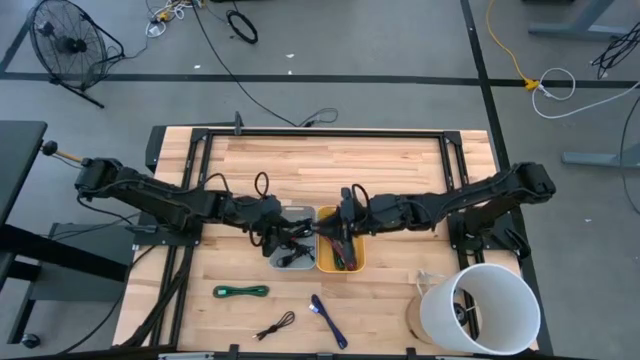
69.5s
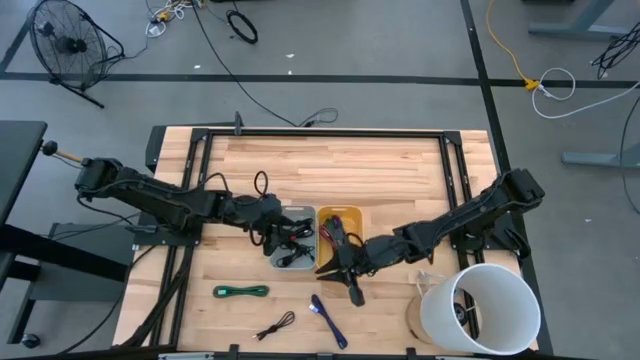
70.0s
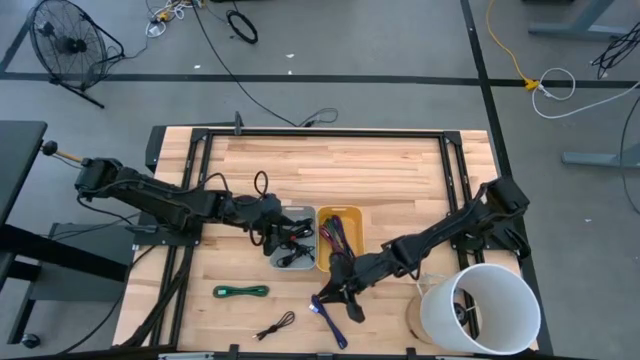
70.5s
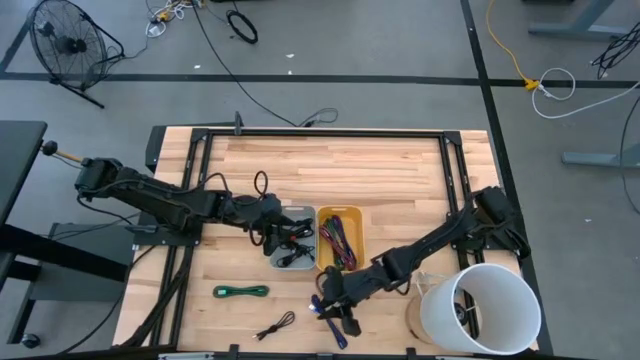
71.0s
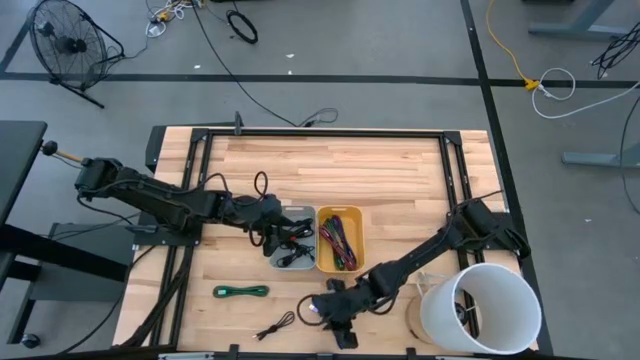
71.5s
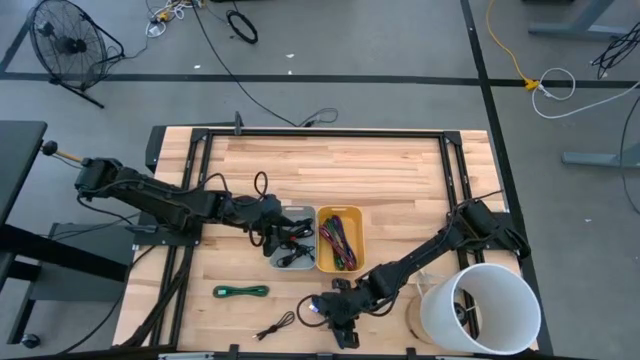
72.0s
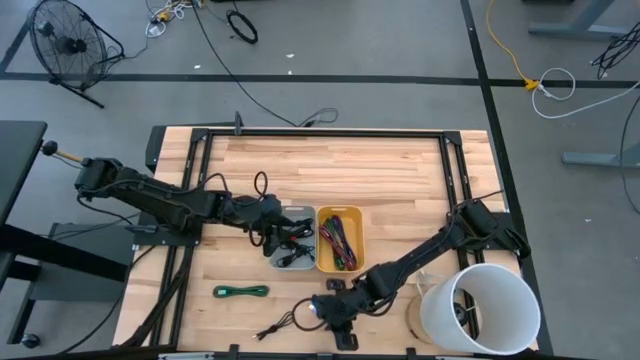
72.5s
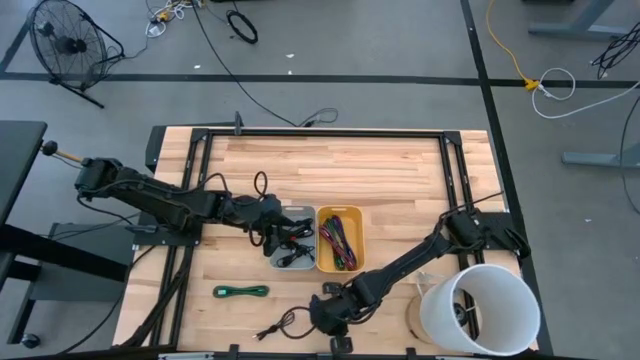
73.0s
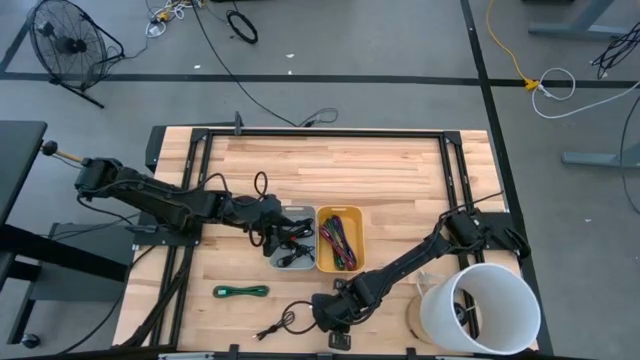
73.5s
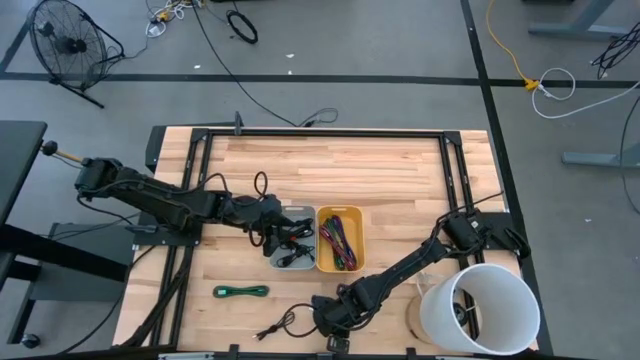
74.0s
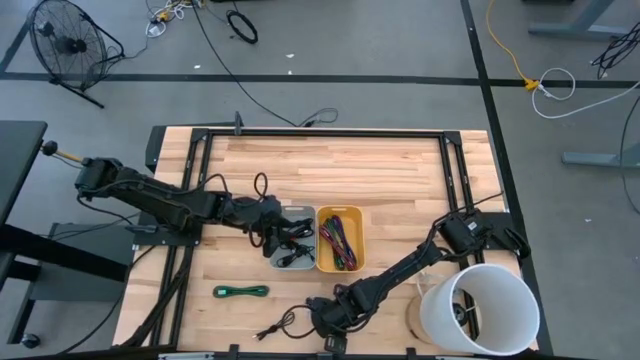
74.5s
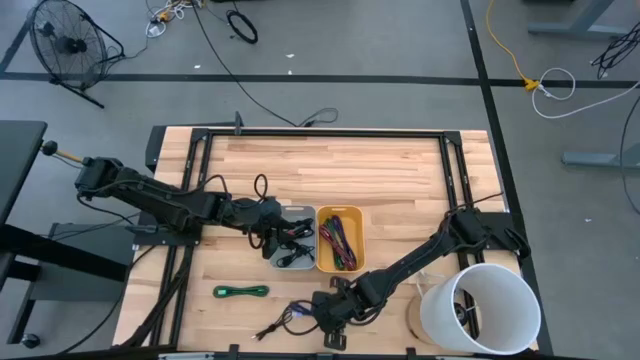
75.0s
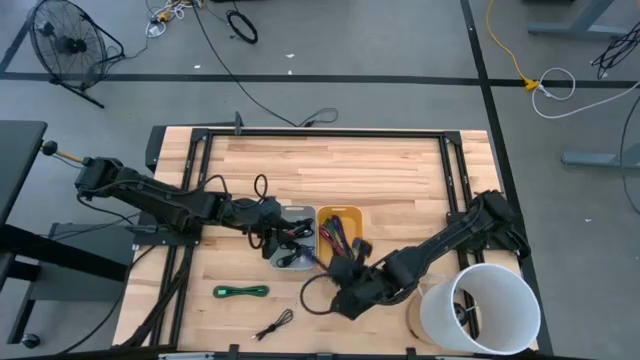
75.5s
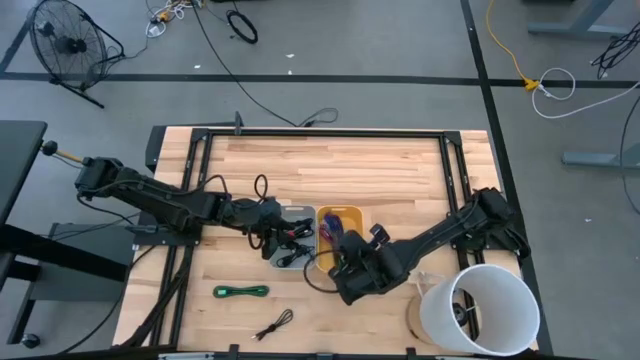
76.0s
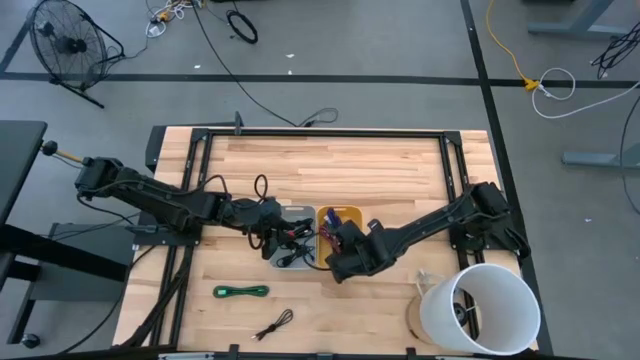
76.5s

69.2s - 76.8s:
Task: Pick & Place USB Port
Put the blue charger cable into the yellow bin

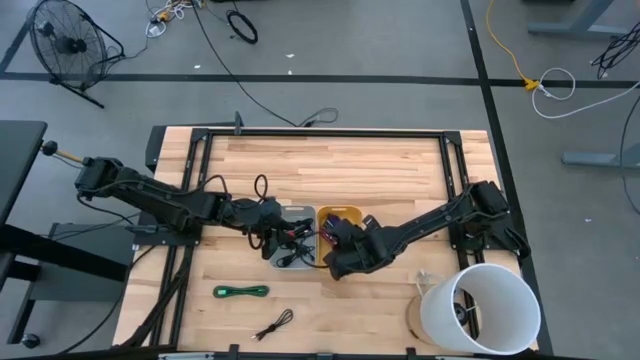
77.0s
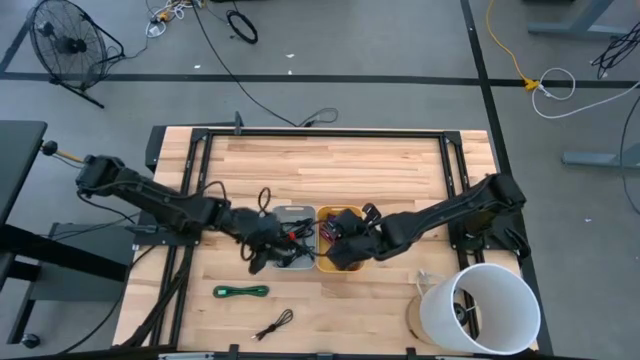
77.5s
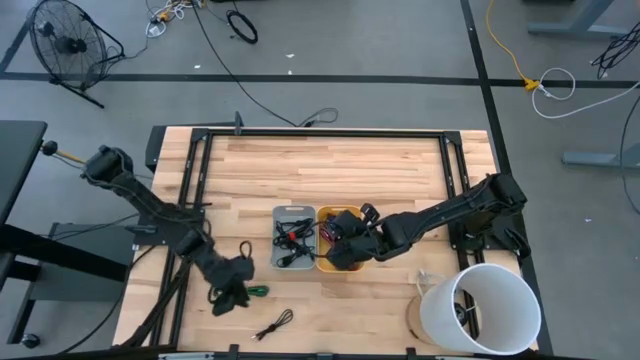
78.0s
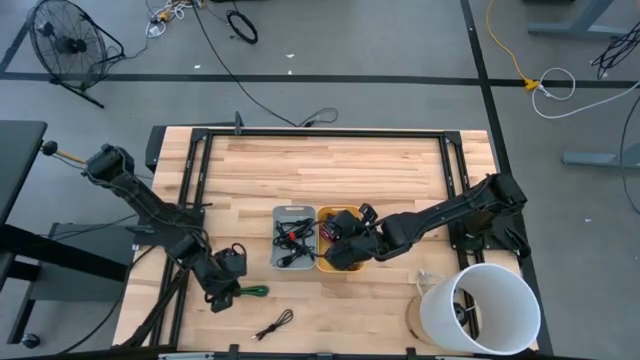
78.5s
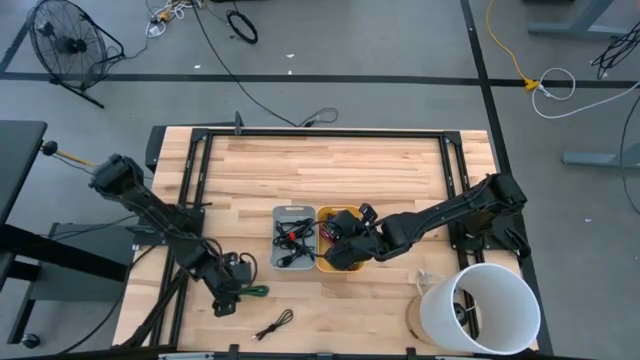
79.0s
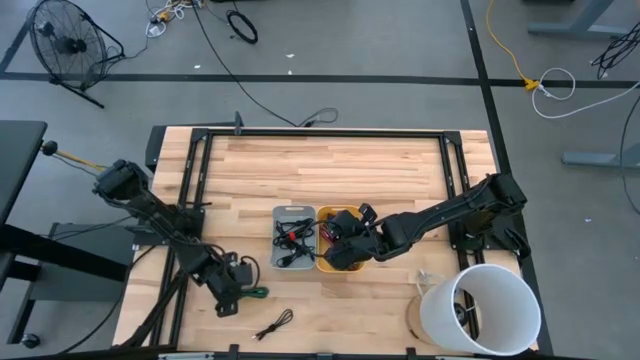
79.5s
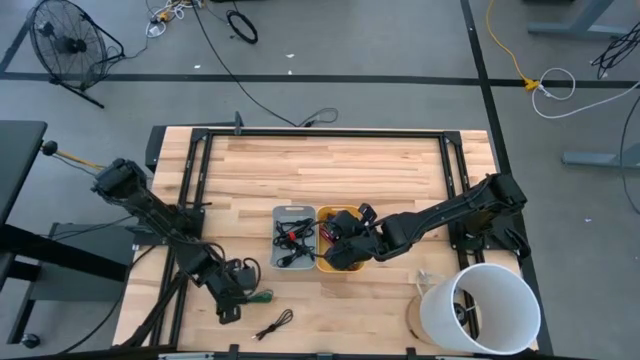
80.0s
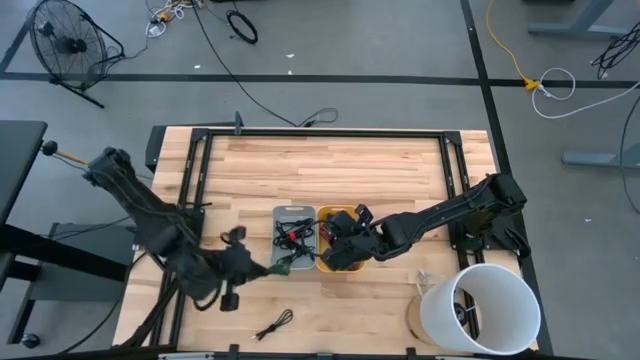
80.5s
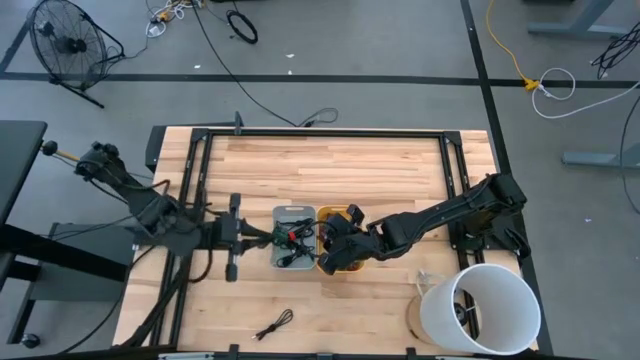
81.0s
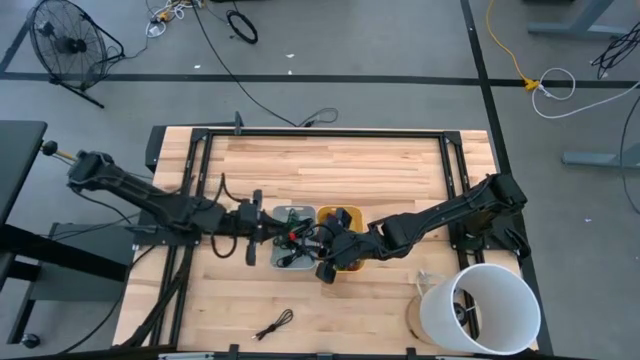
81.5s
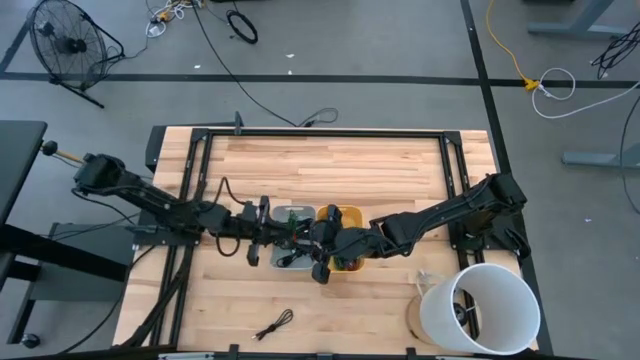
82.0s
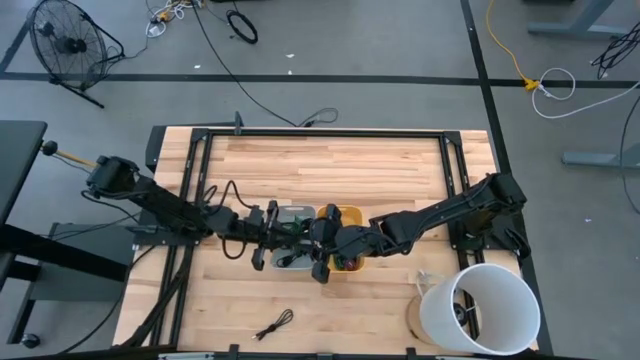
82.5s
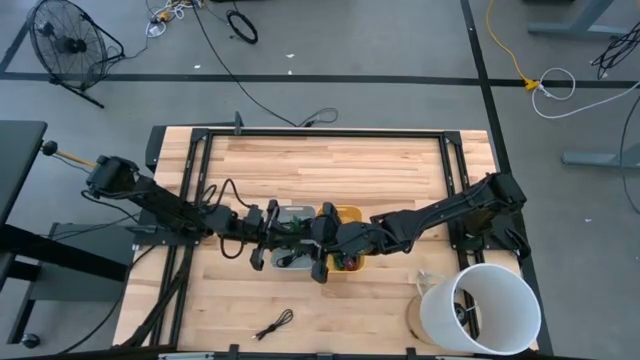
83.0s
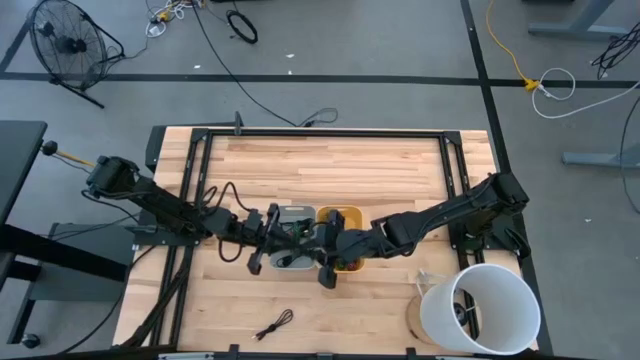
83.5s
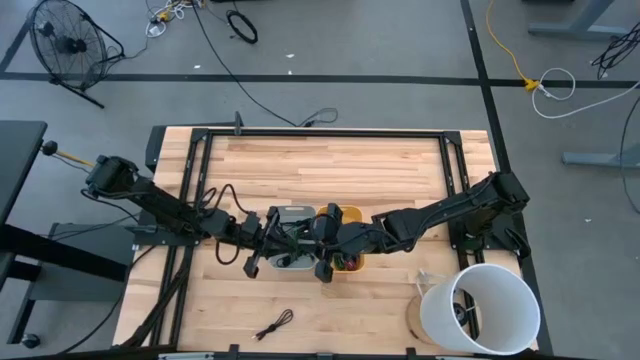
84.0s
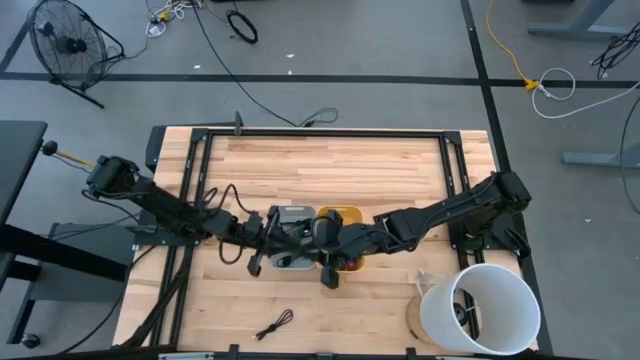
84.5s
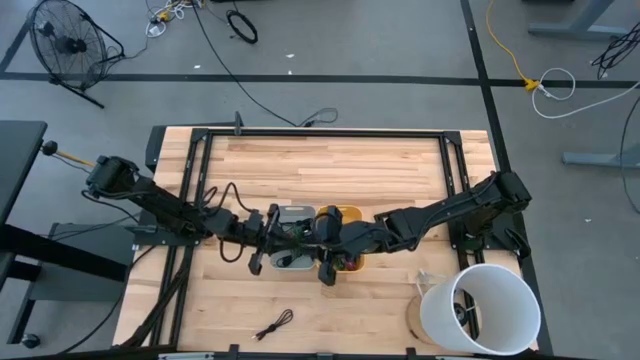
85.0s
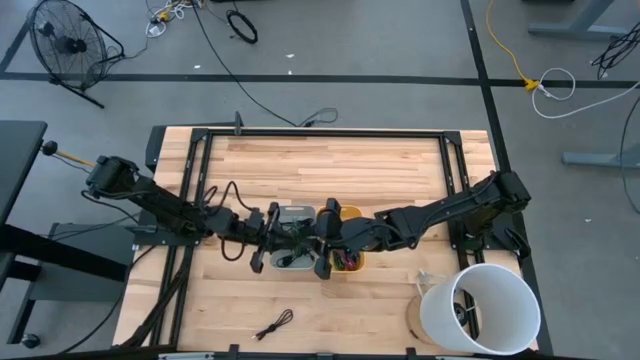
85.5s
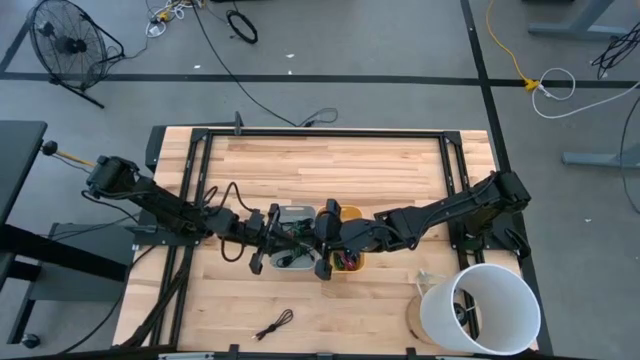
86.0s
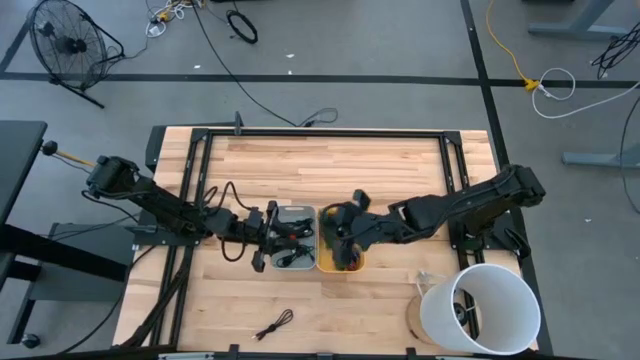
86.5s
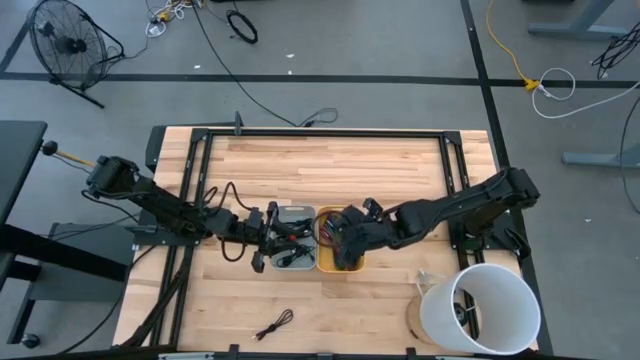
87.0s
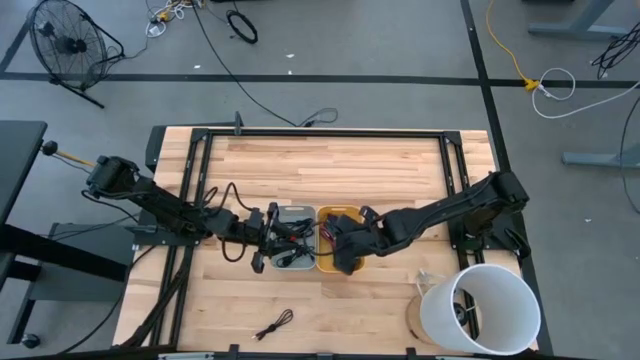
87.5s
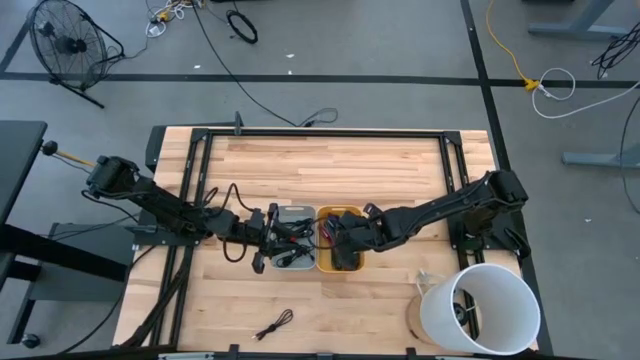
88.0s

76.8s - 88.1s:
Put the green charger cable into the yellow bin

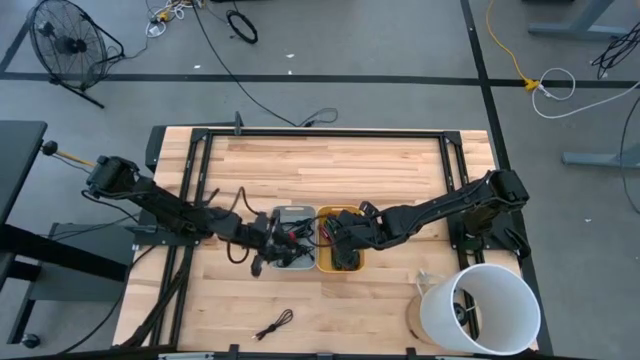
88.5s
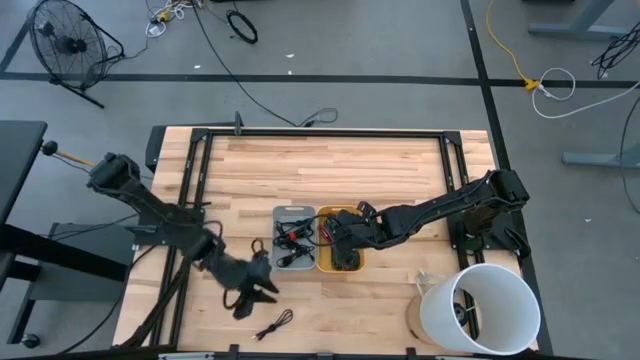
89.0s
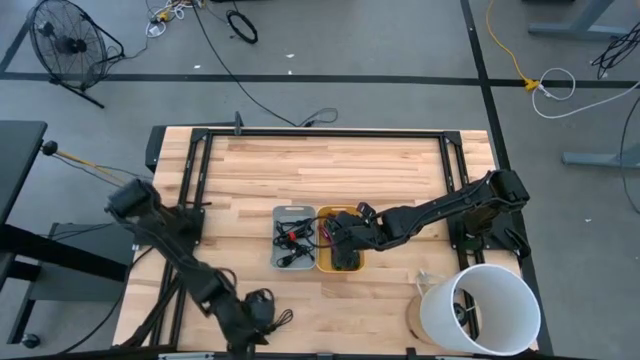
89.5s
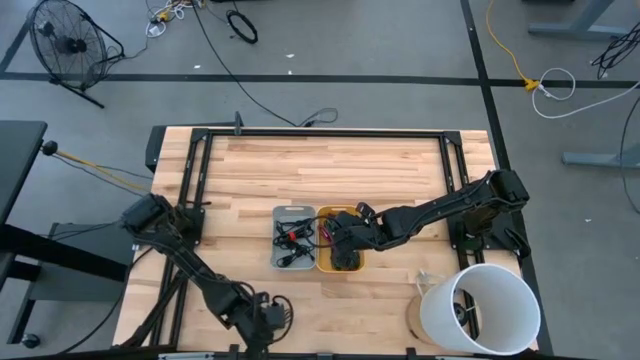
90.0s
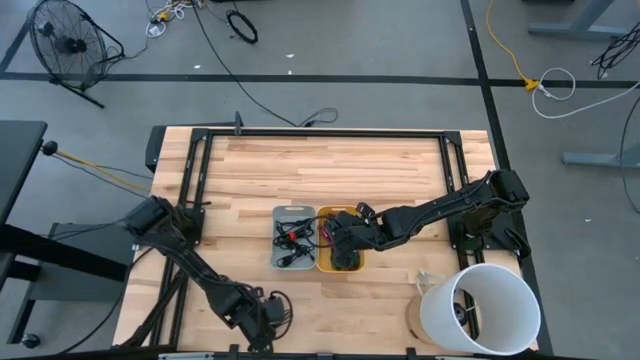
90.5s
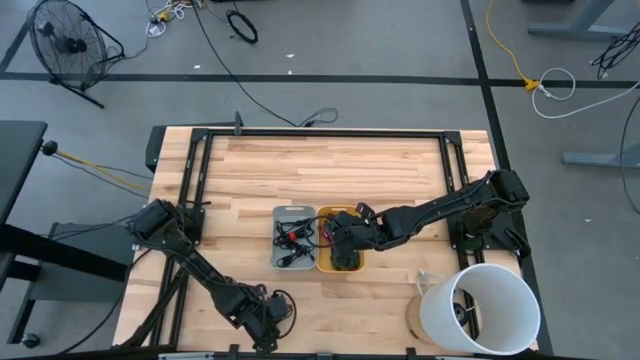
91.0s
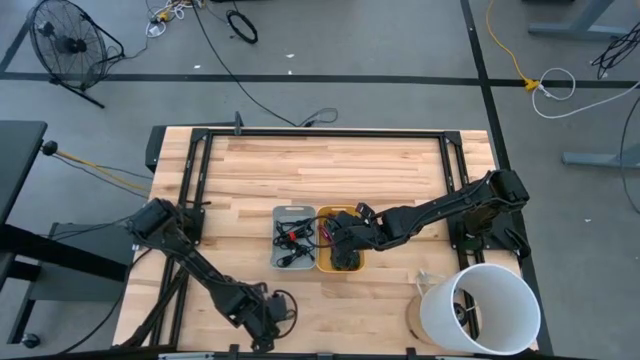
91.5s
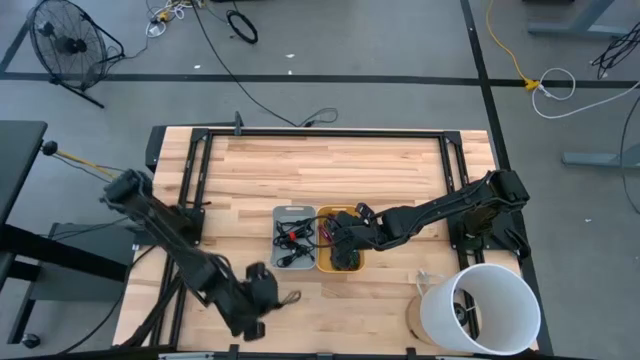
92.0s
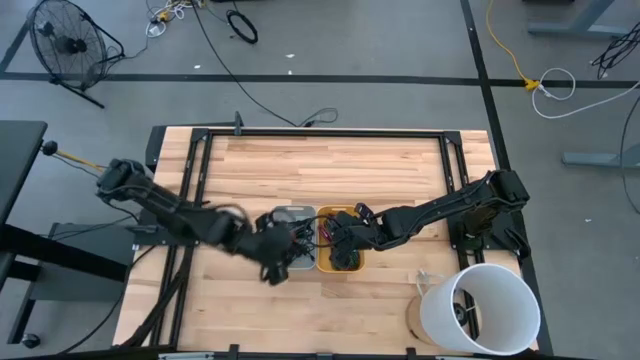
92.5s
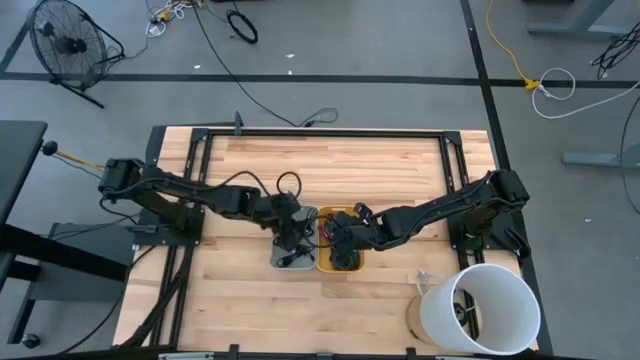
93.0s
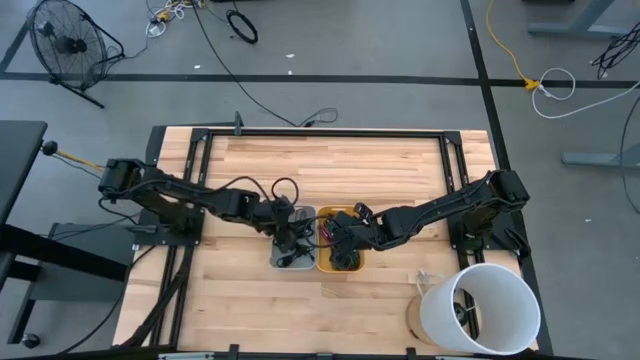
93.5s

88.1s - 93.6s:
Put the black charger cable into the gray bin
